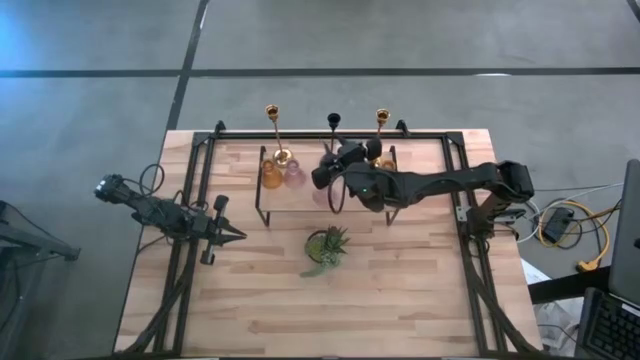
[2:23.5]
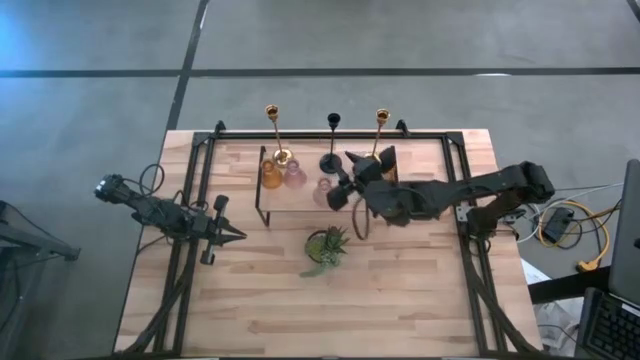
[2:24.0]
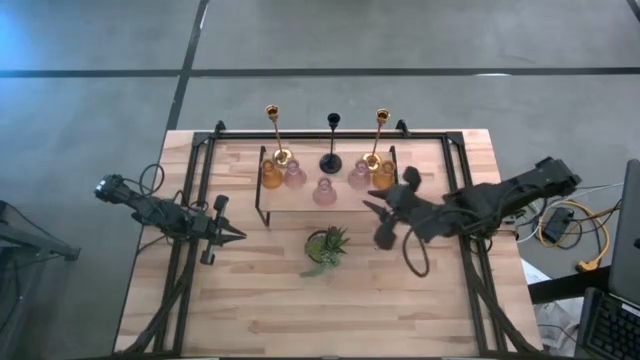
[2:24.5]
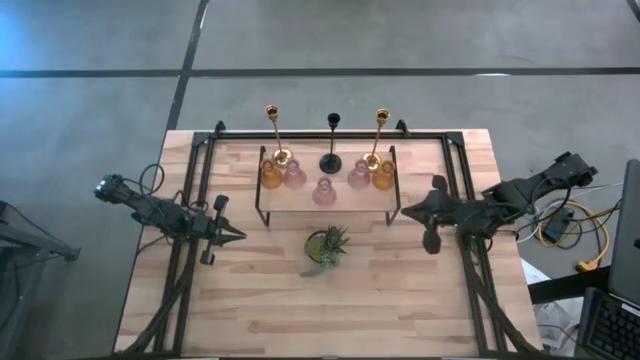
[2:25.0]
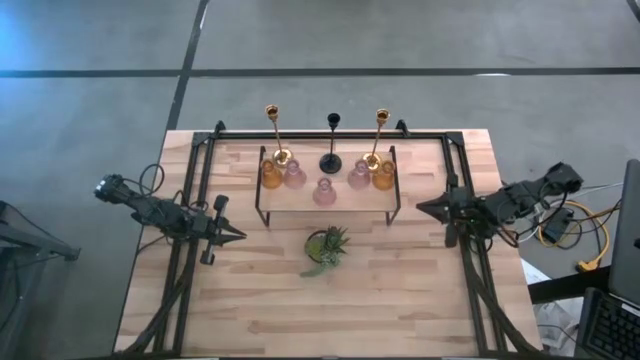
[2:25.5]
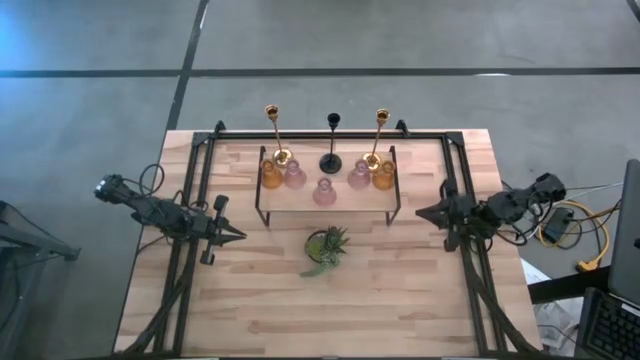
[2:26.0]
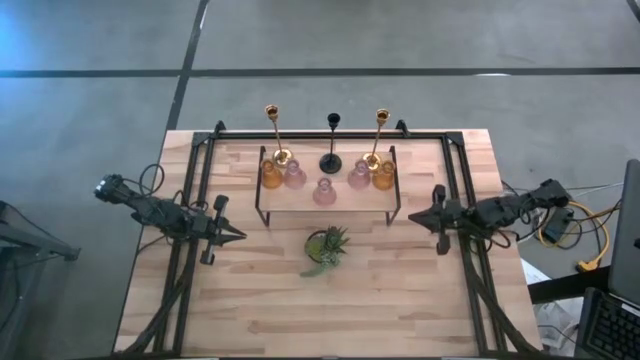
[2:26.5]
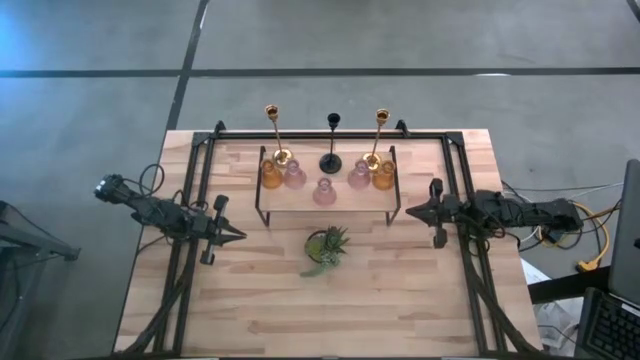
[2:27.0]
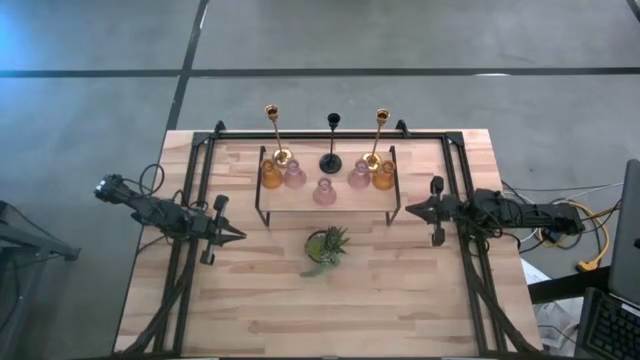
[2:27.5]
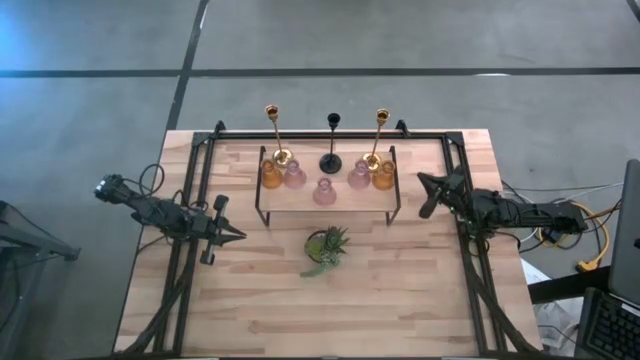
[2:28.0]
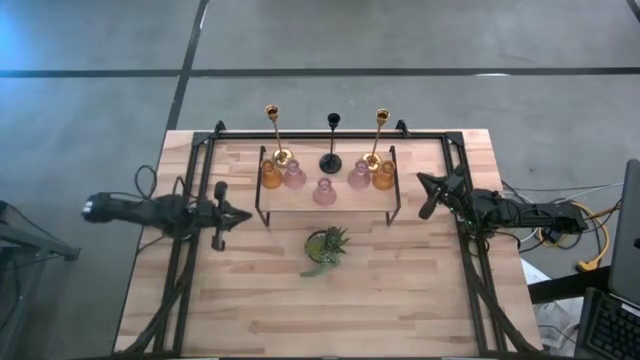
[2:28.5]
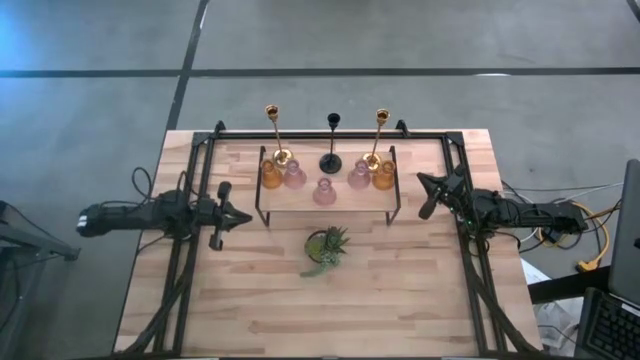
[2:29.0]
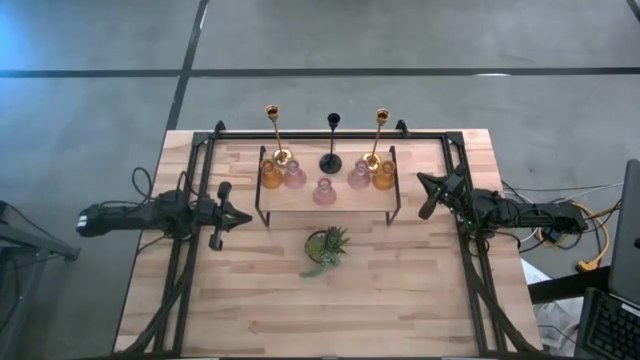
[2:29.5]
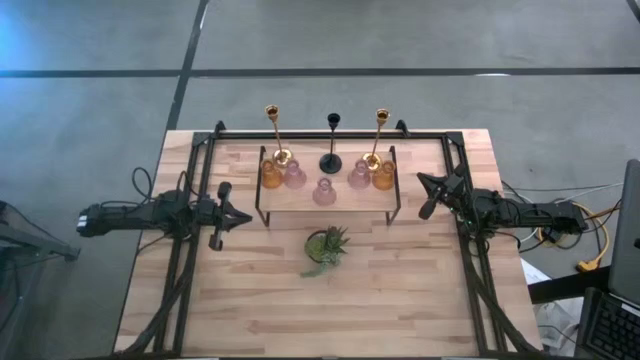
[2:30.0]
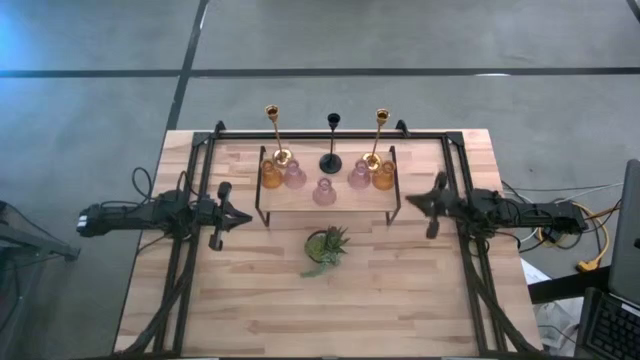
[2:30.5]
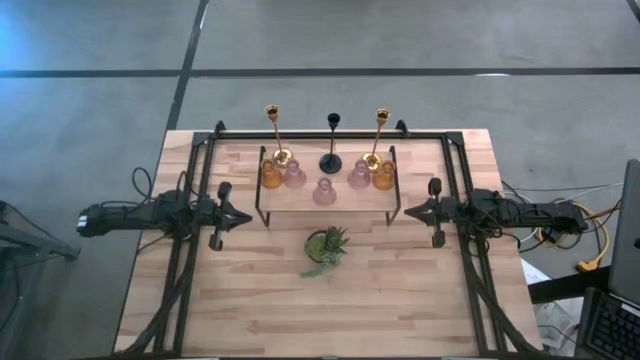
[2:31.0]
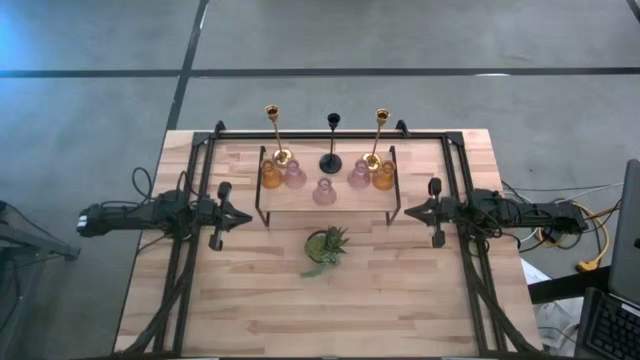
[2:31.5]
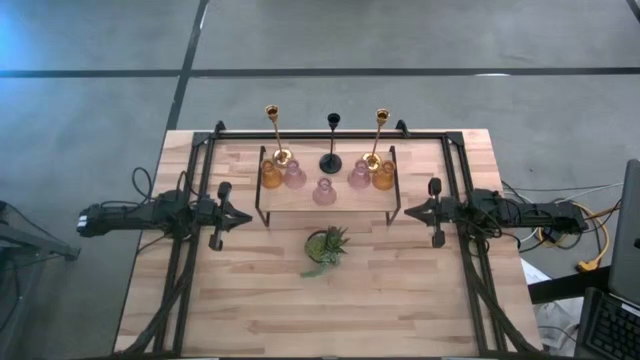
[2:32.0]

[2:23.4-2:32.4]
Task: Pick & Place candle stick holders
Return to Home Position

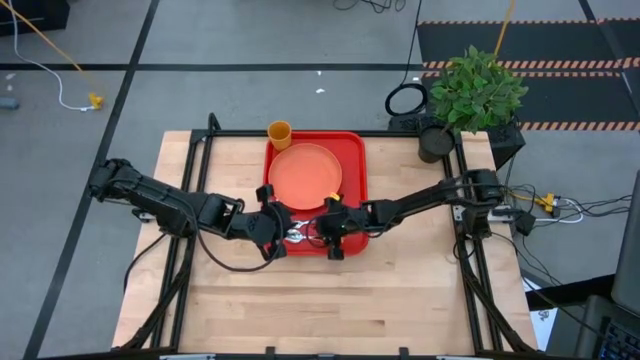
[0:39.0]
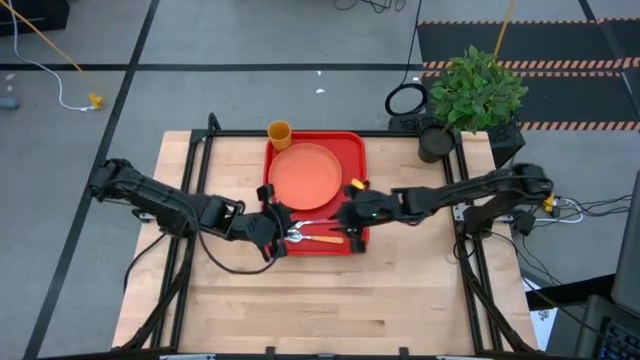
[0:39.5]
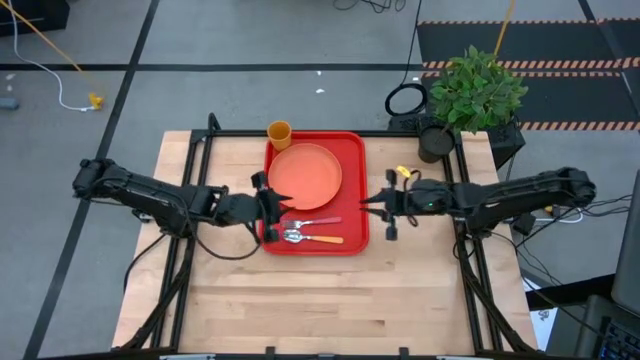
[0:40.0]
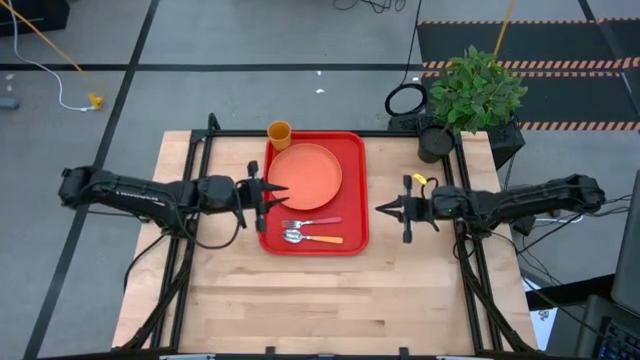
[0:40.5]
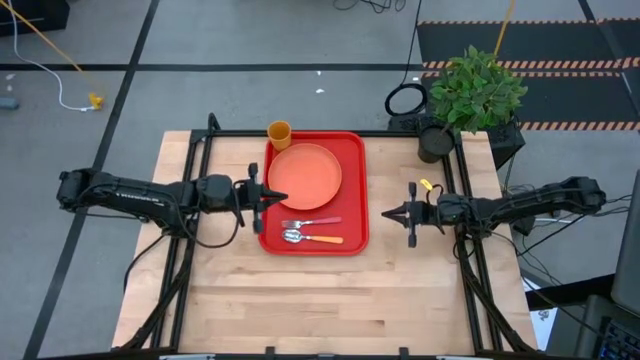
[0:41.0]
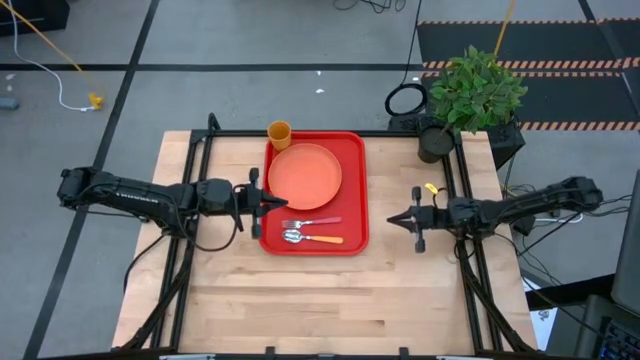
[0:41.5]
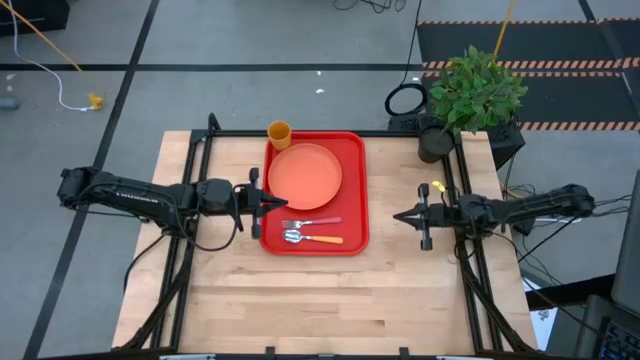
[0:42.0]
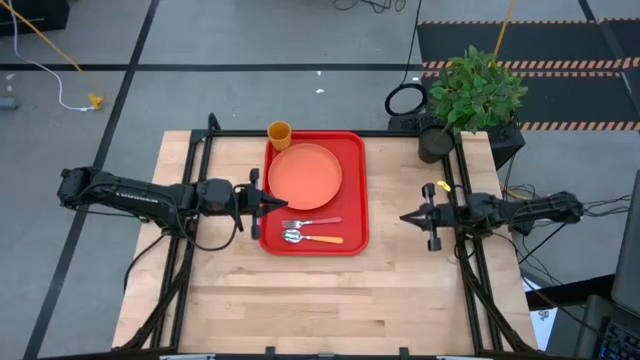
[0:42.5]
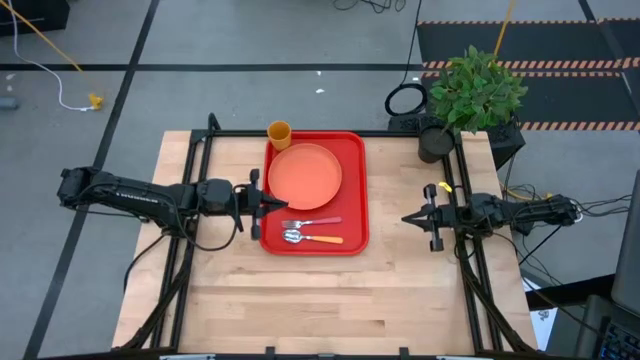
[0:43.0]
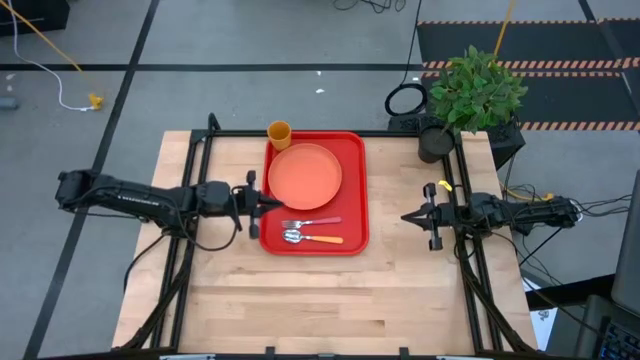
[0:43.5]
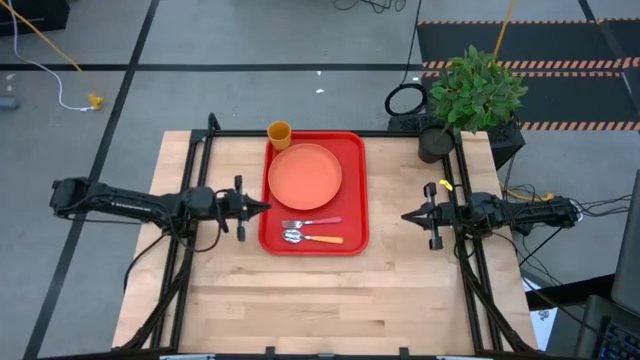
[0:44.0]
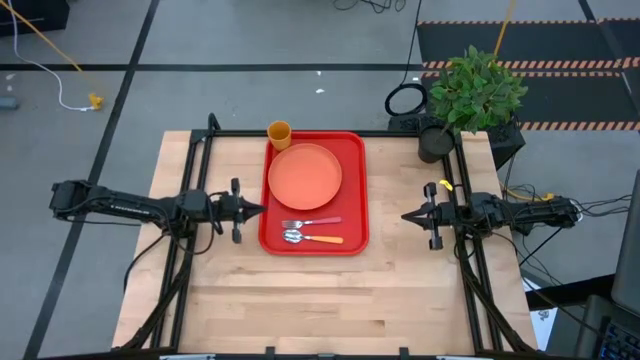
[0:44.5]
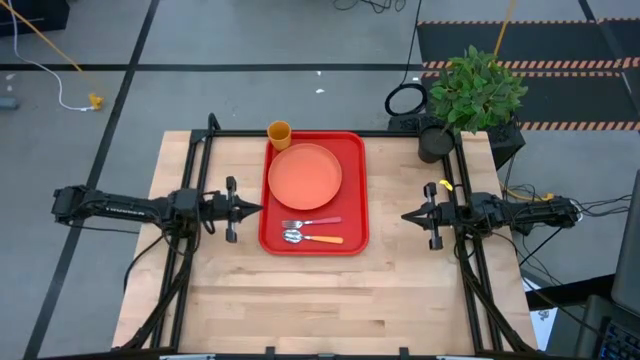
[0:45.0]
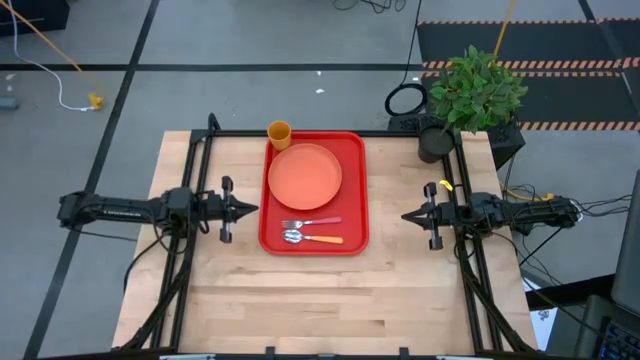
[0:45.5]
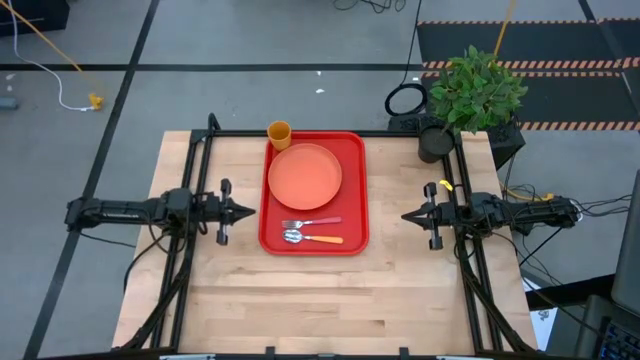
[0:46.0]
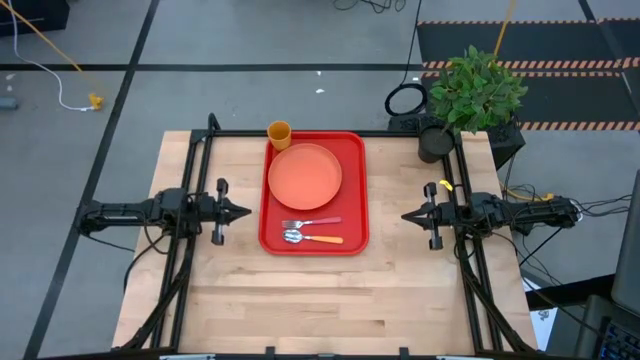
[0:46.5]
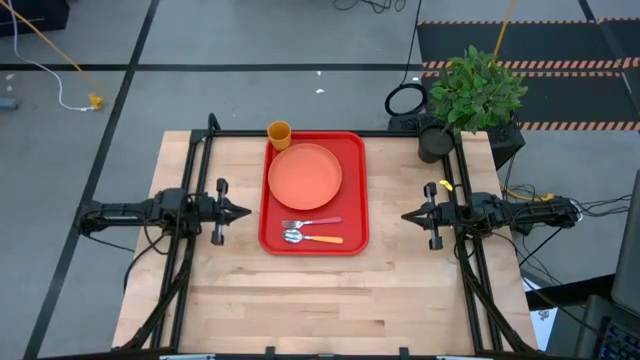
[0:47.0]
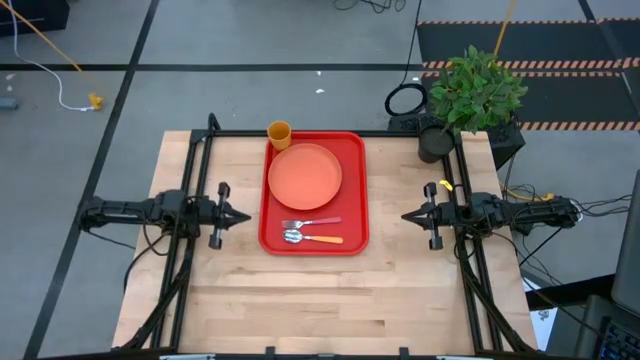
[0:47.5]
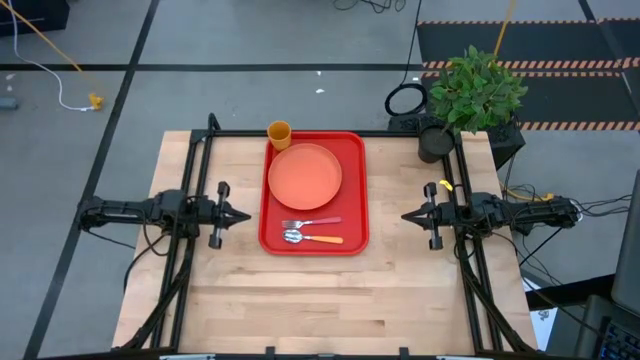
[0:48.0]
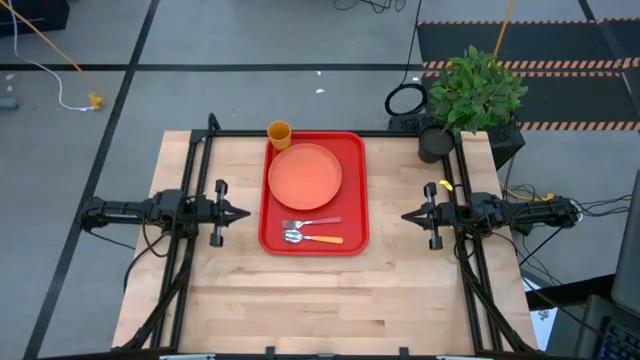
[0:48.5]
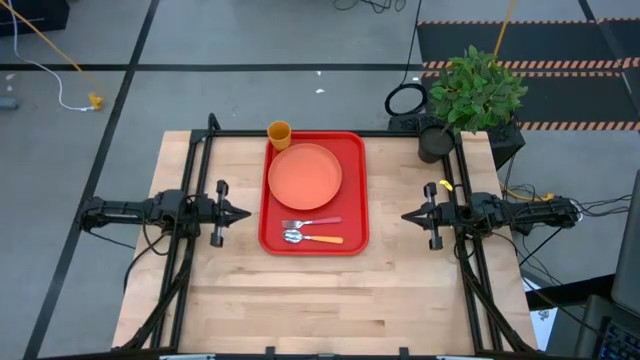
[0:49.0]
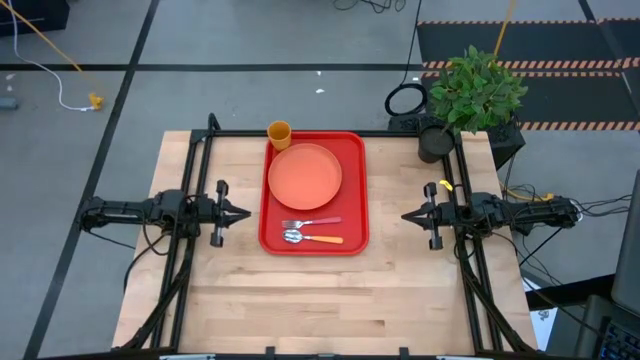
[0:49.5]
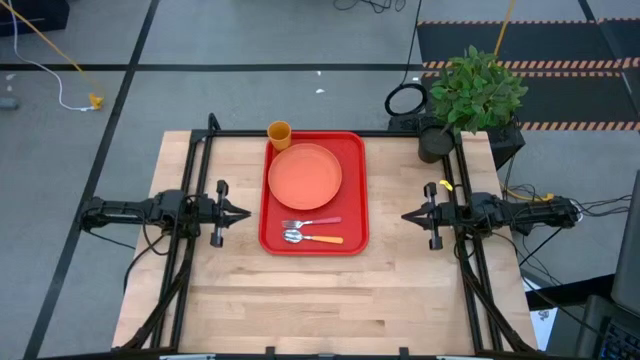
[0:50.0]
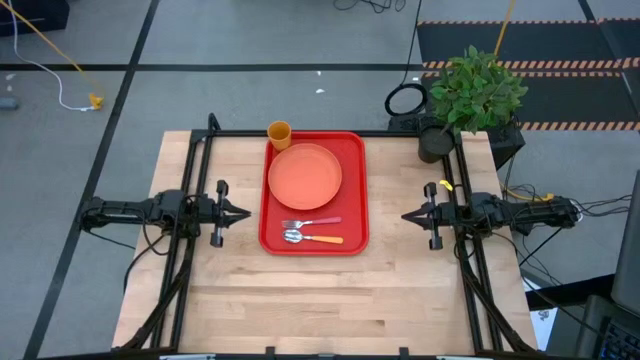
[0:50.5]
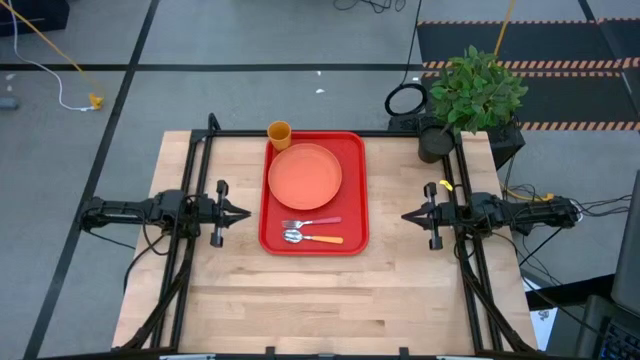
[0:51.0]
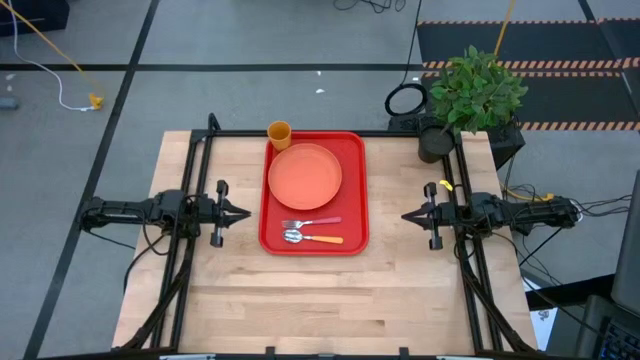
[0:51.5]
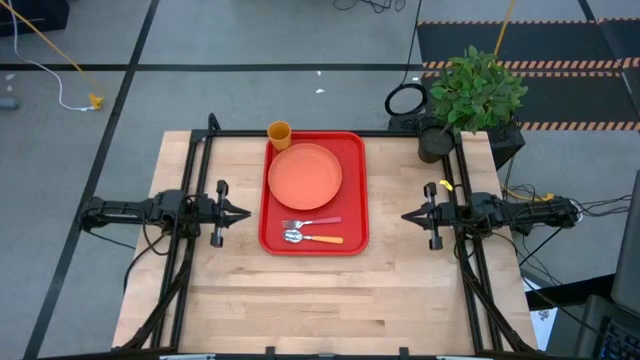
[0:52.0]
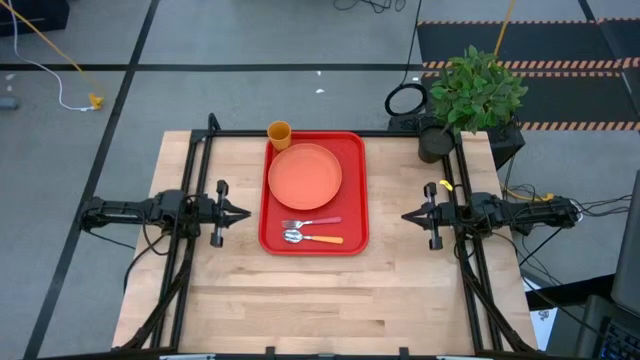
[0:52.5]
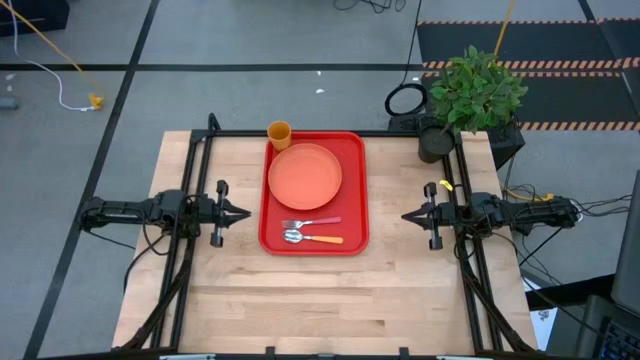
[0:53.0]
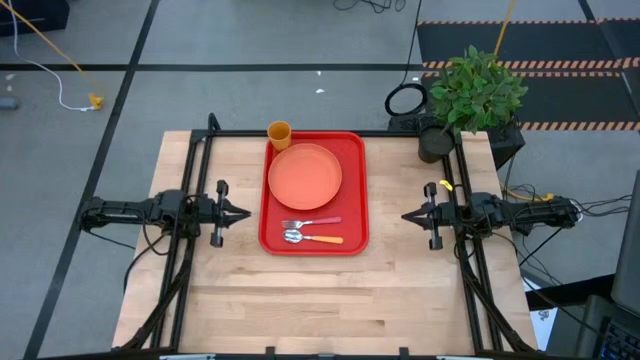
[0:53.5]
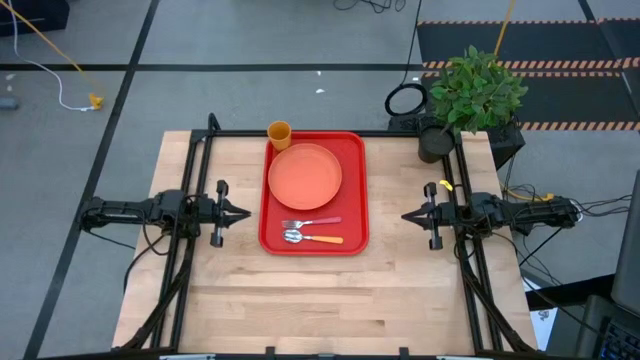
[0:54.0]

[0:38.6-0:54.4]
Task: Pick and place plate/cup/fork/spoon on tray
Return to Home Position
